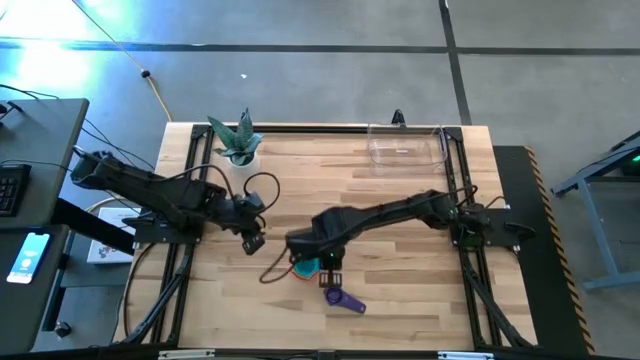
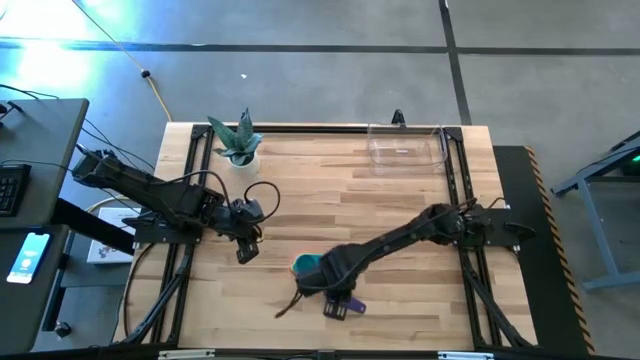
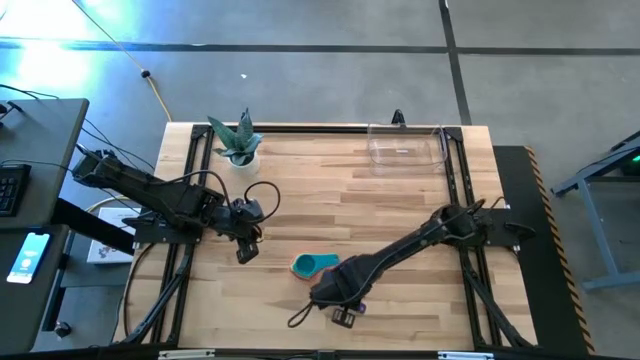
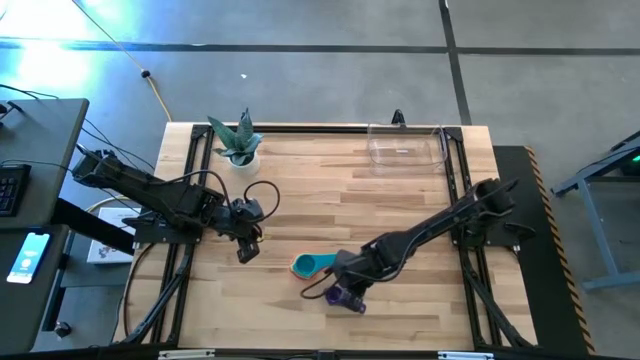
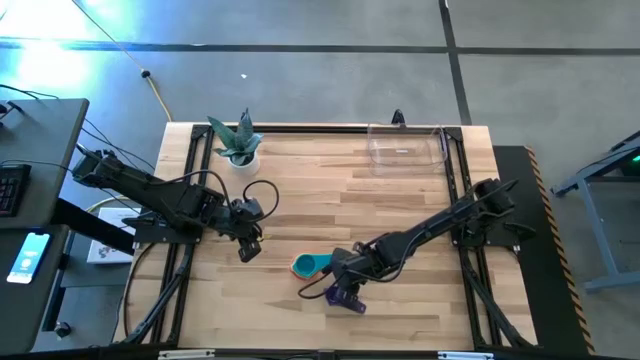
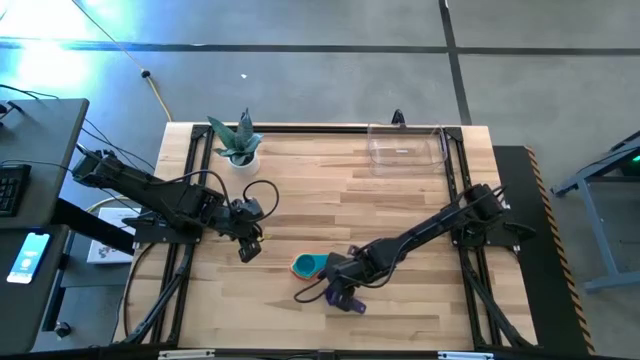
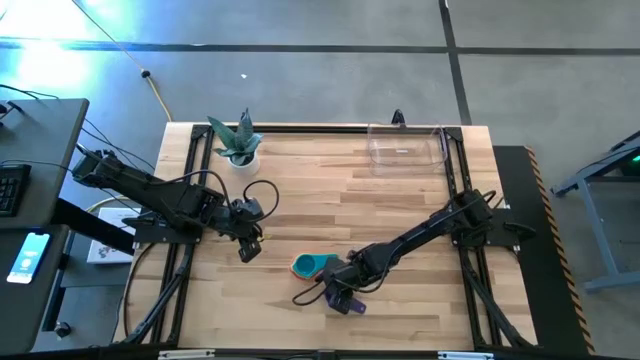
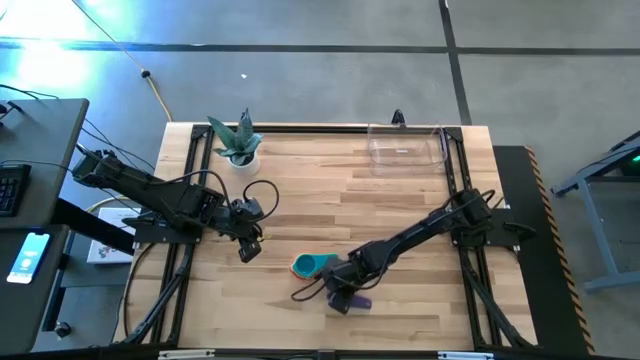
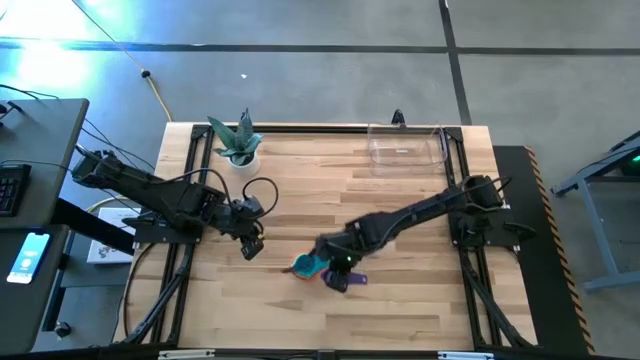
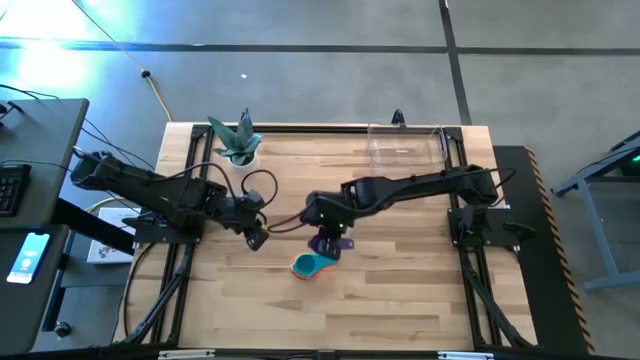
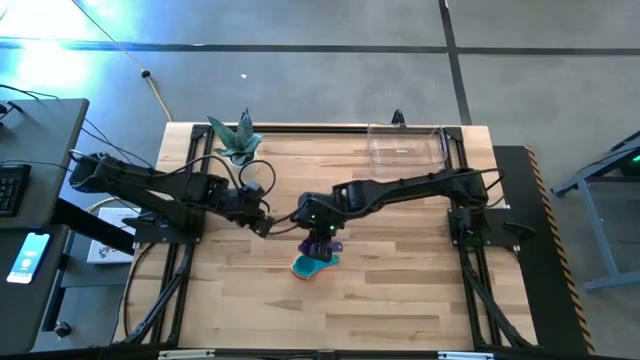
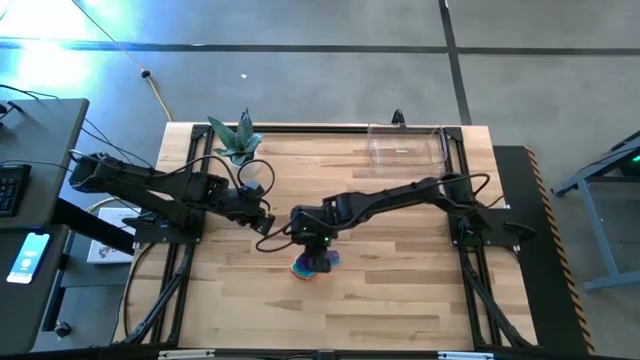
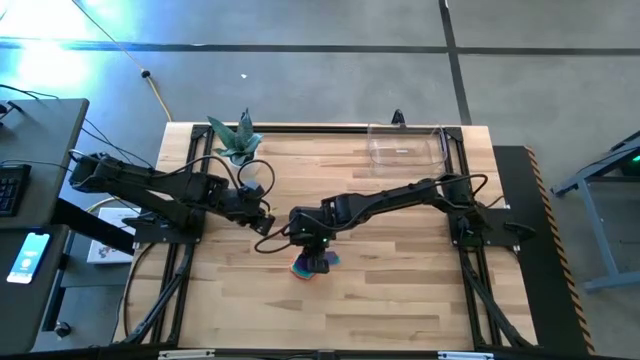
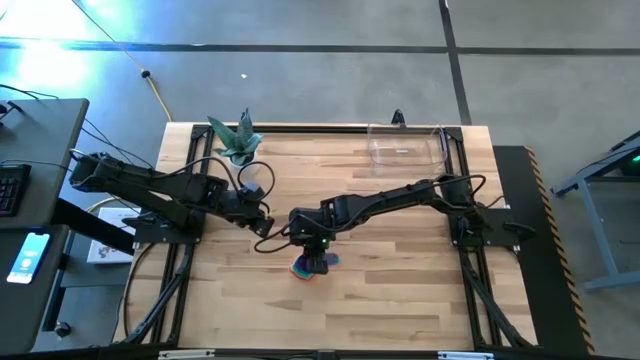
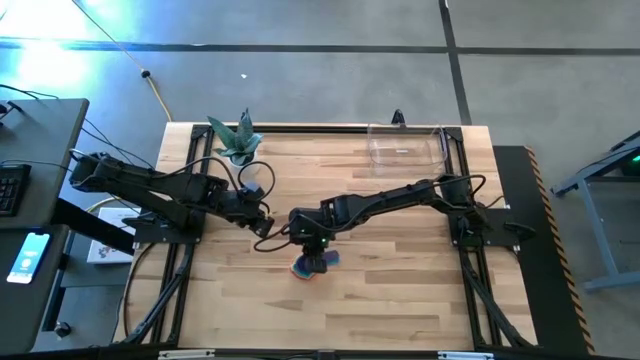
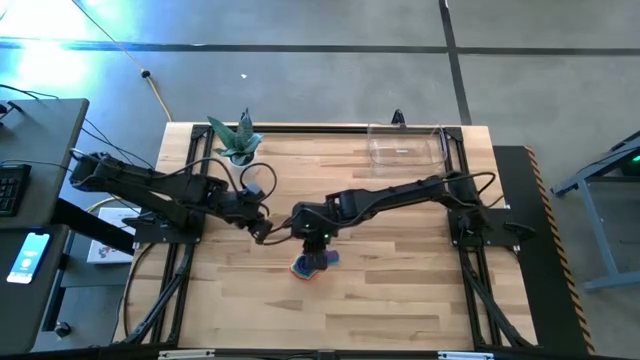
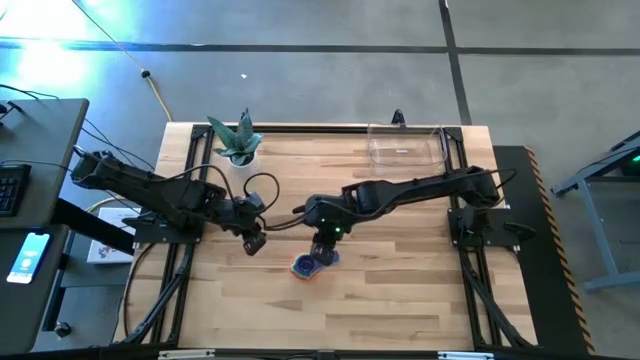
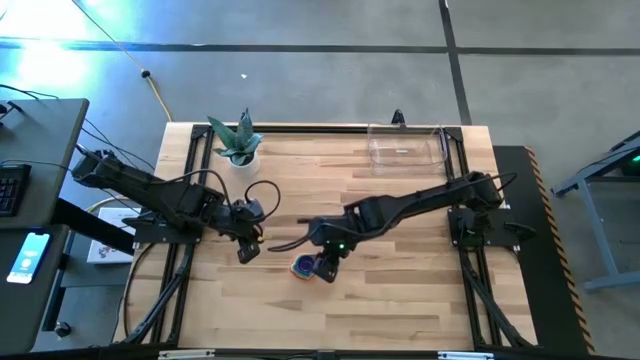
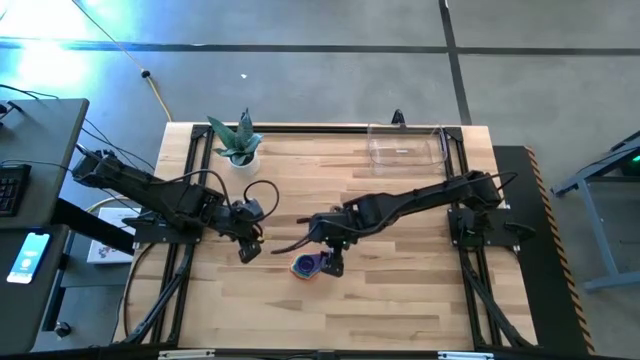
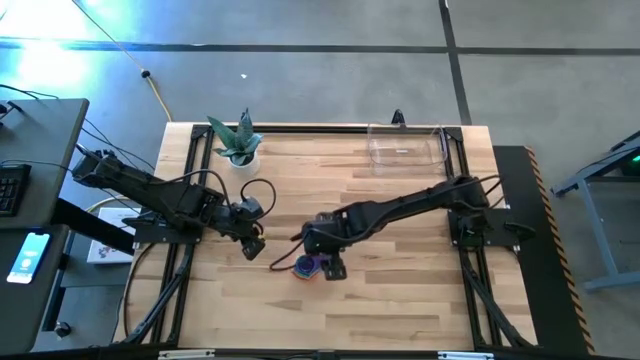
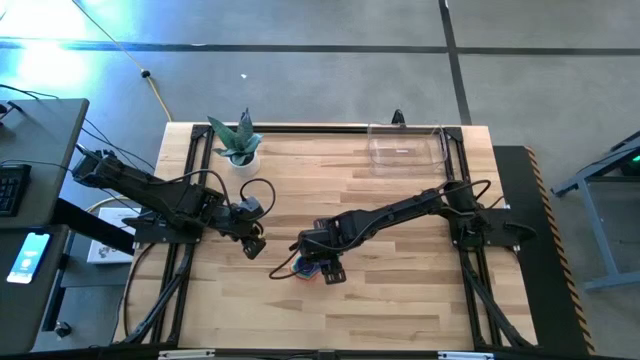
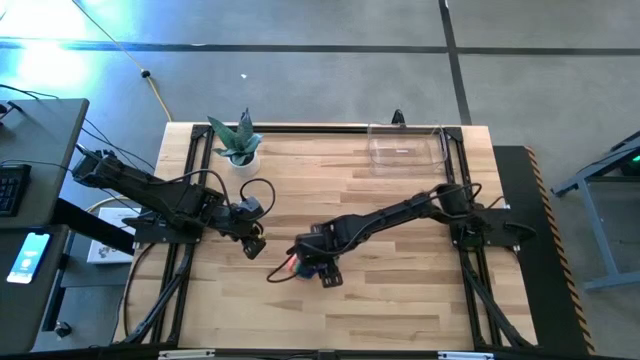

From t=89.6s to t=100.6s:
Task: Nest measuring cups in basket
Stack the violet measuring cup into the blue measuring cup

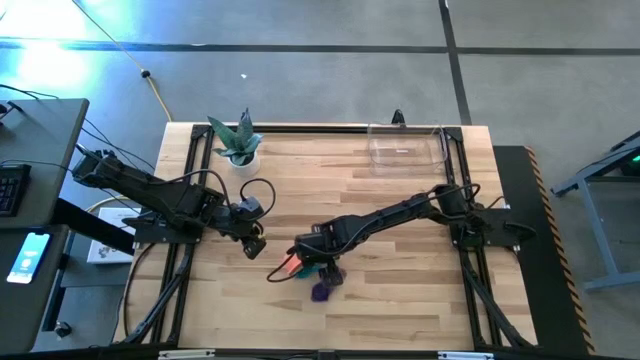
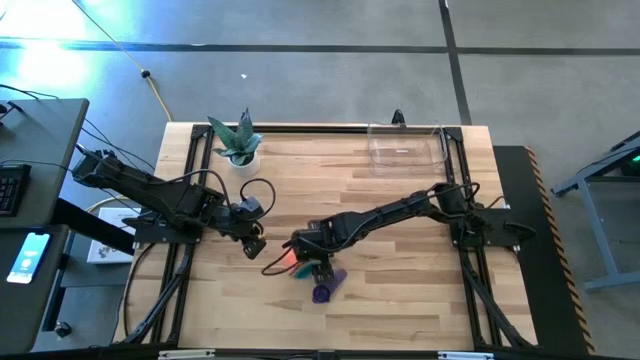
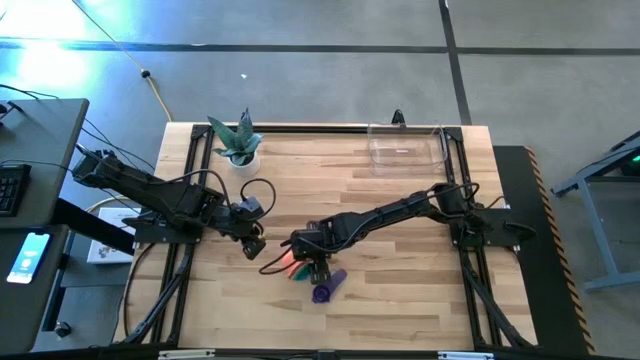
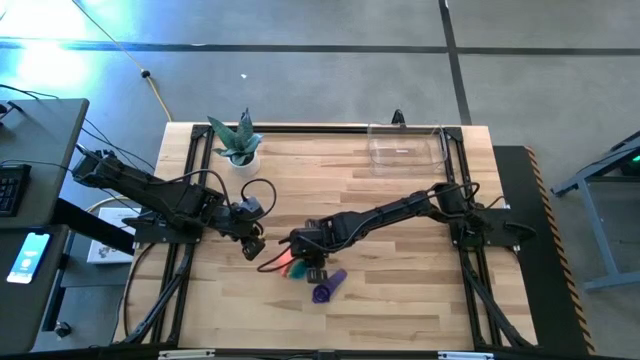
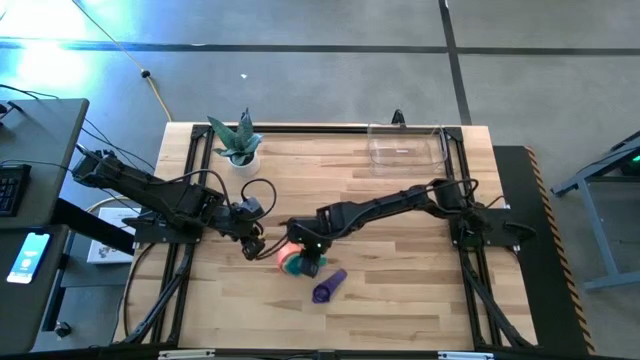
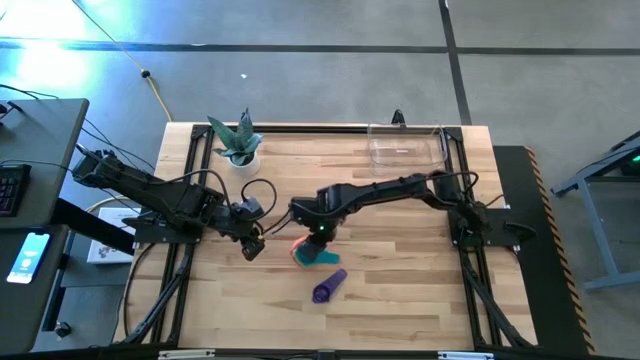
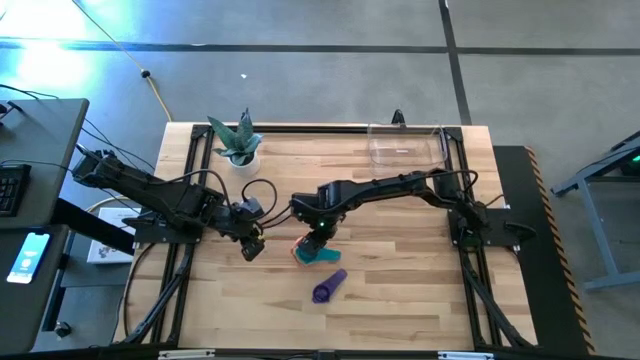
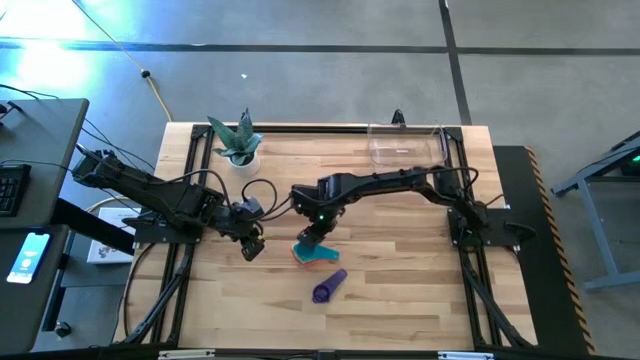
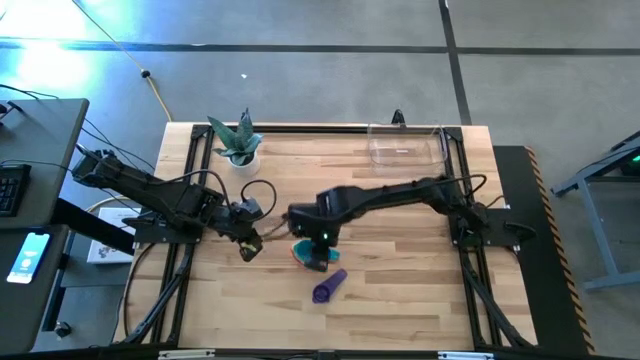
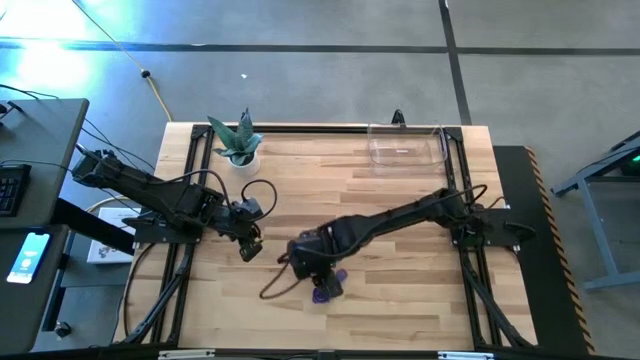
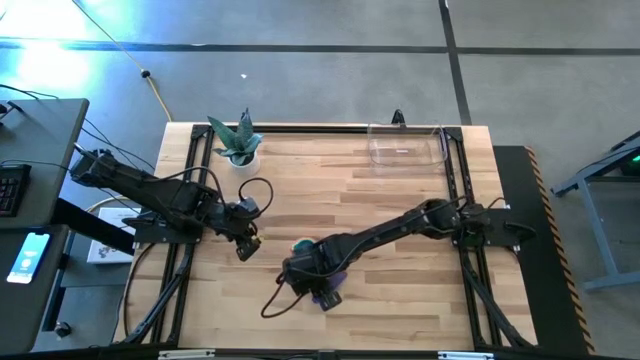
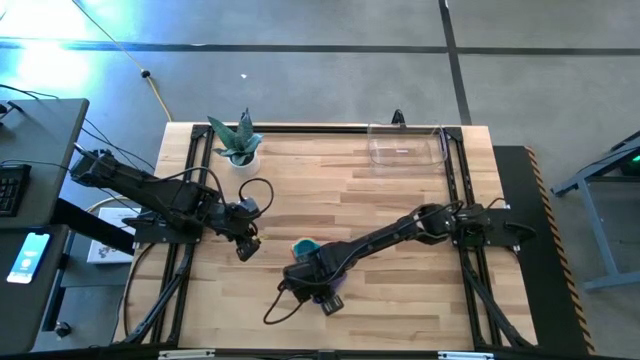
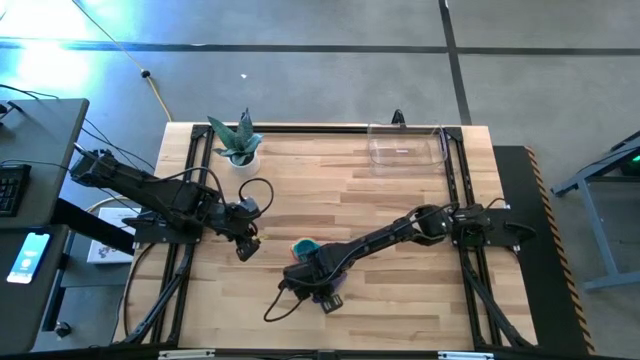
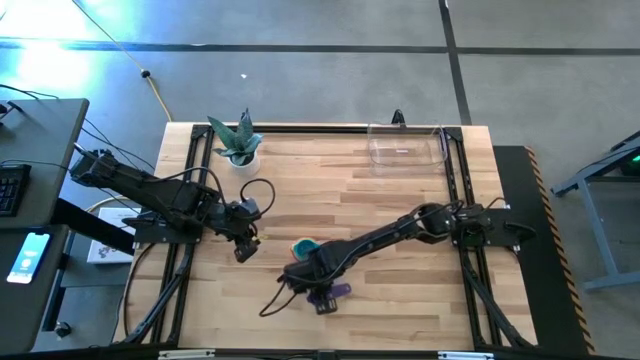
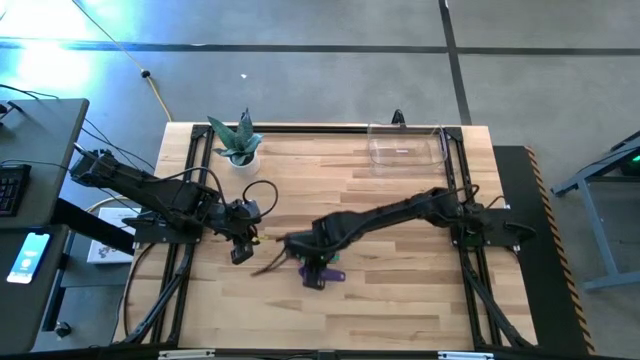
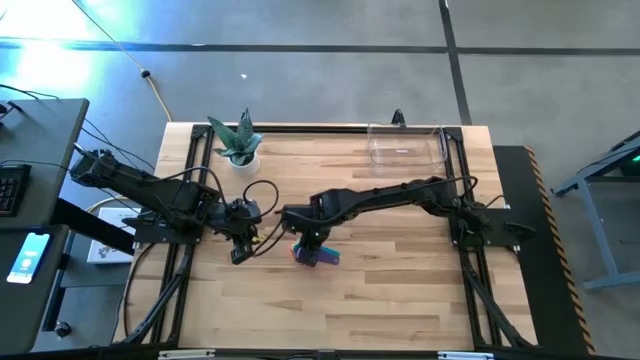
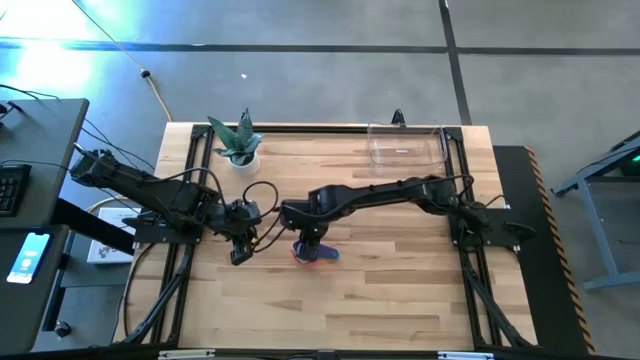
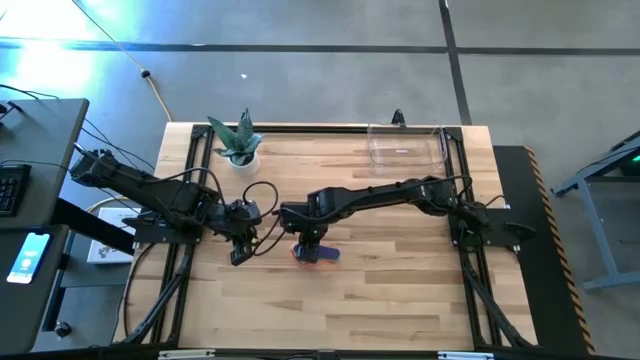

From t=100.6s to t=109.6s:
Stack the violet measuring cup into the blue measuring cup
